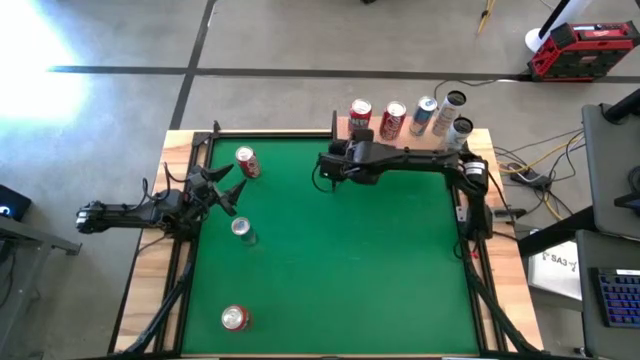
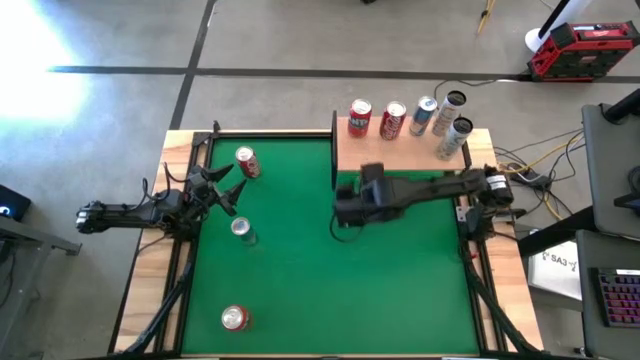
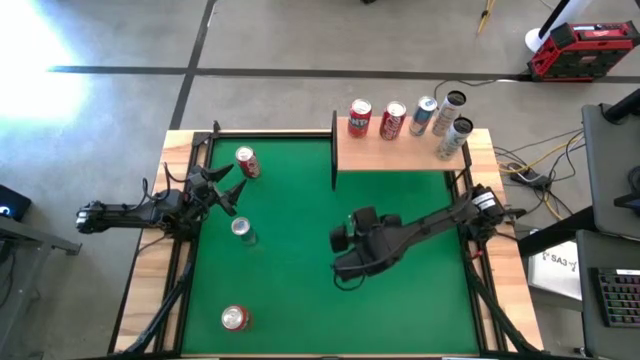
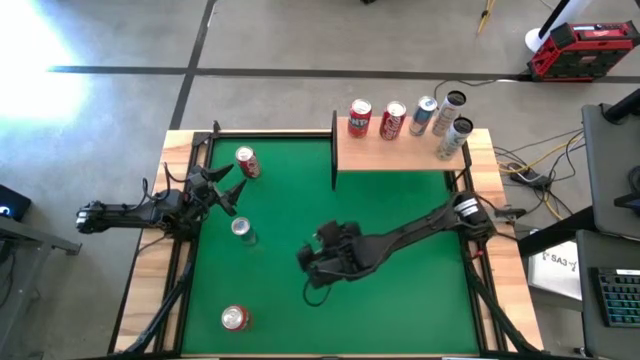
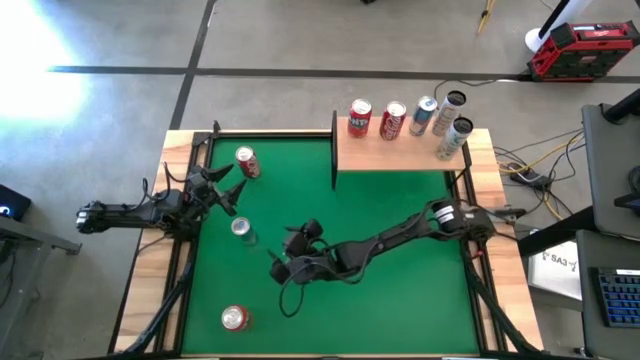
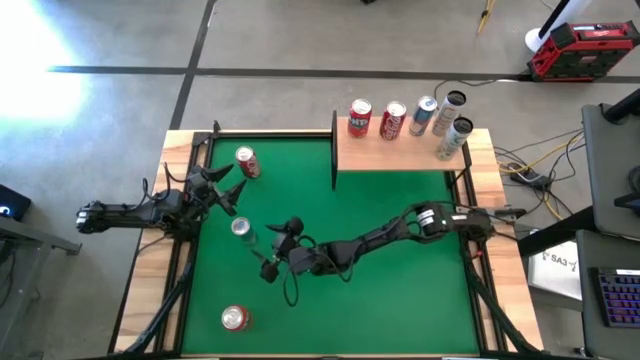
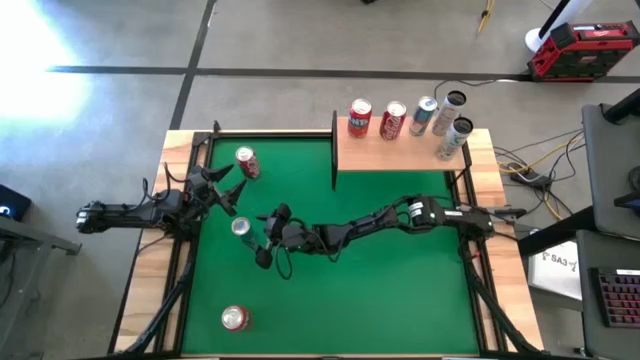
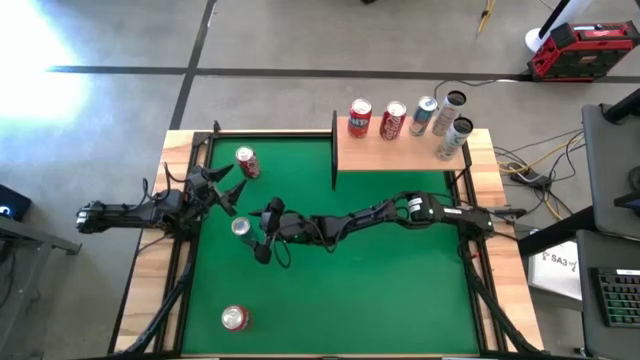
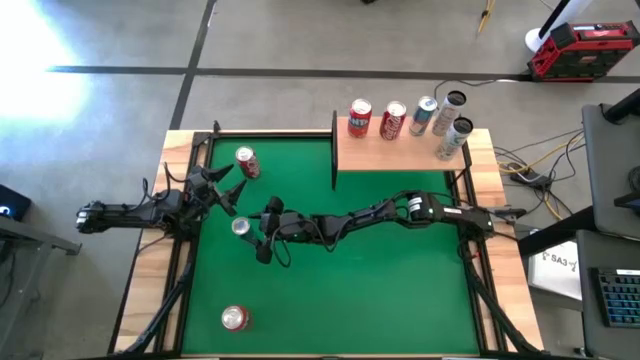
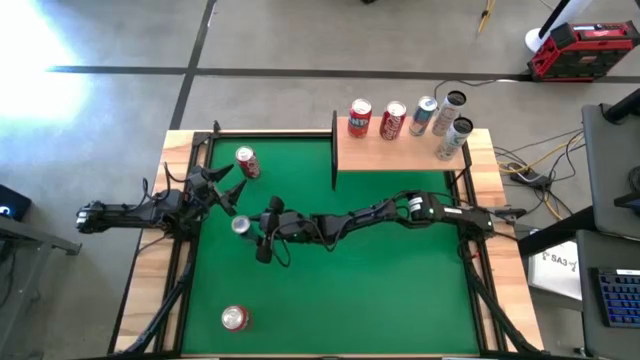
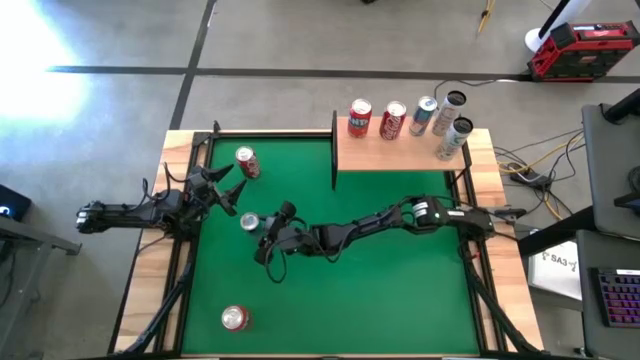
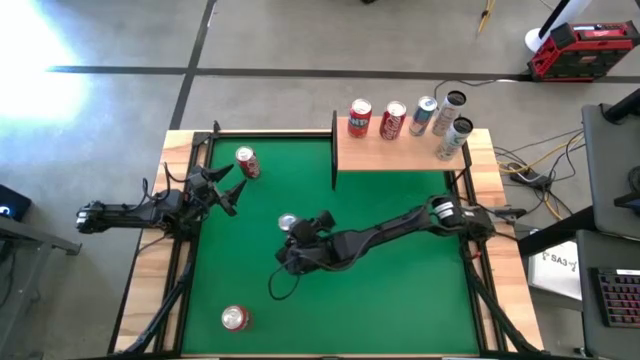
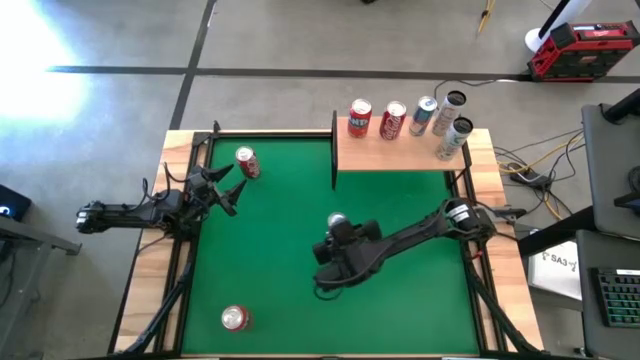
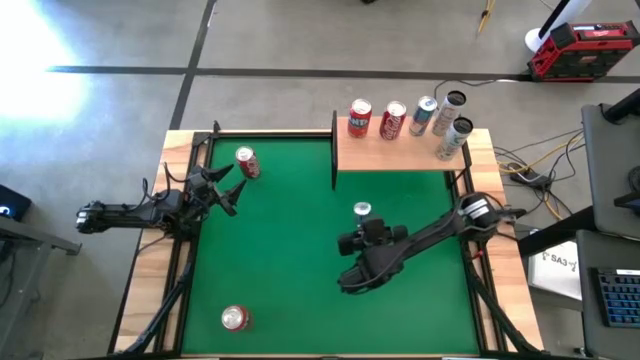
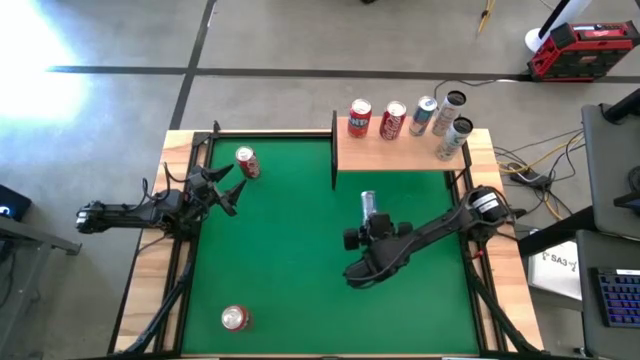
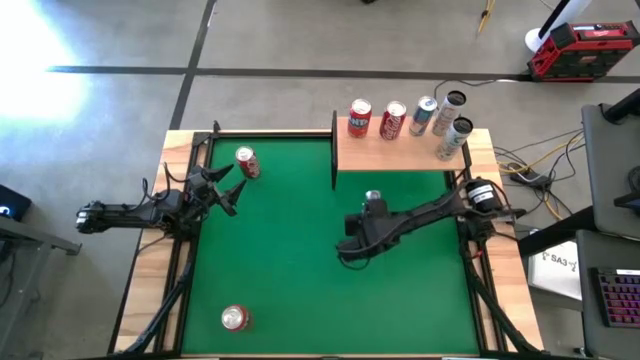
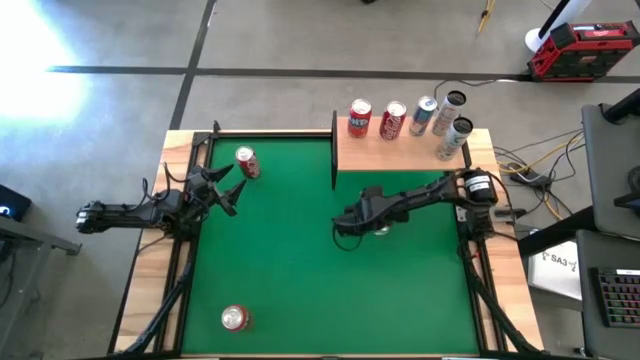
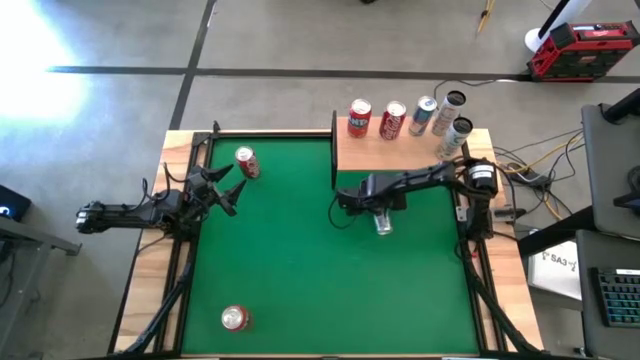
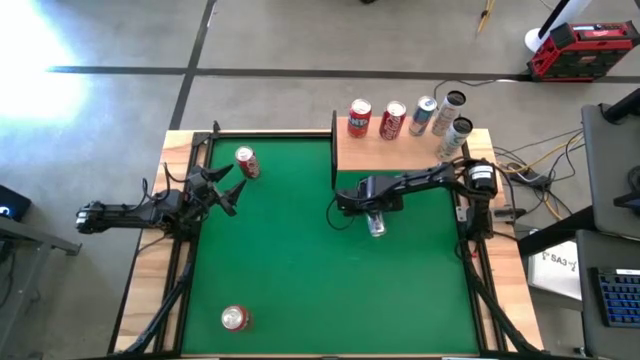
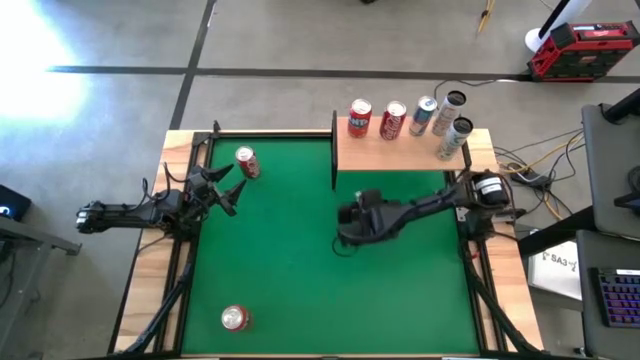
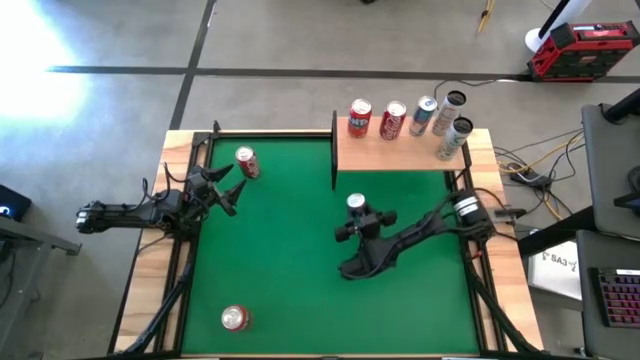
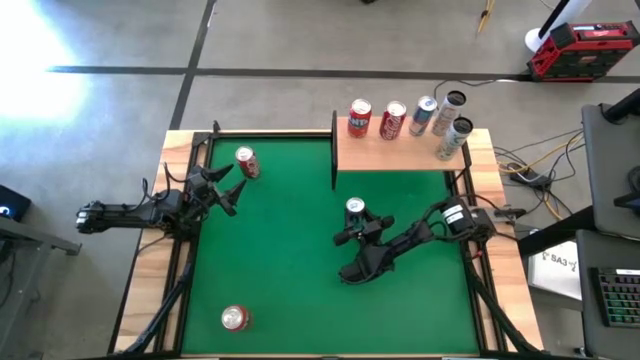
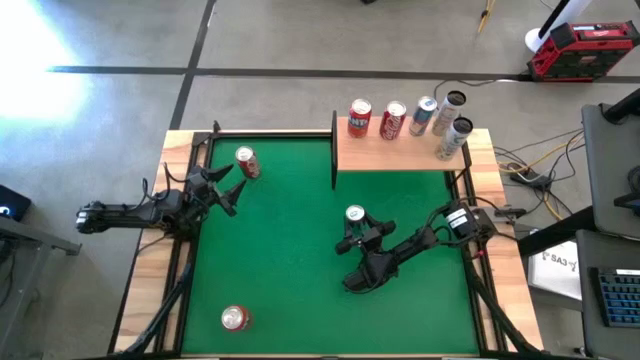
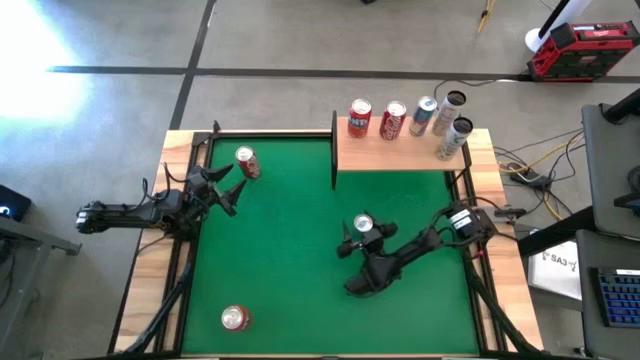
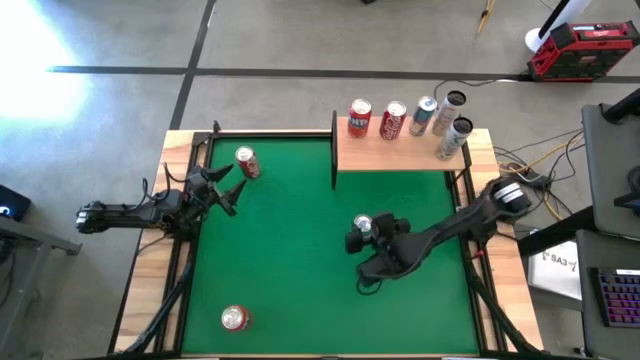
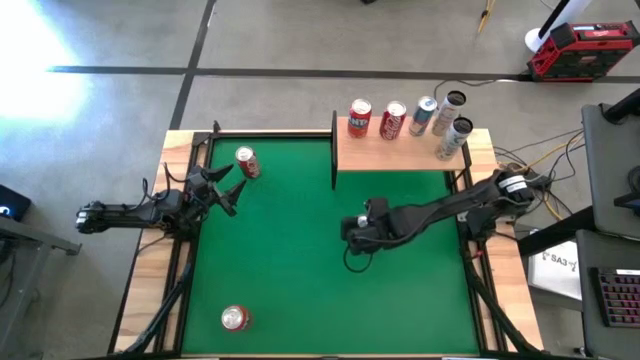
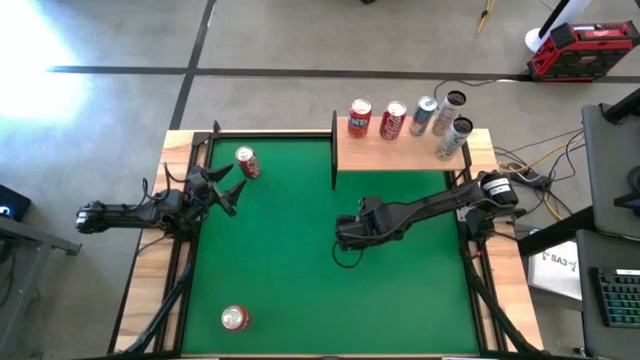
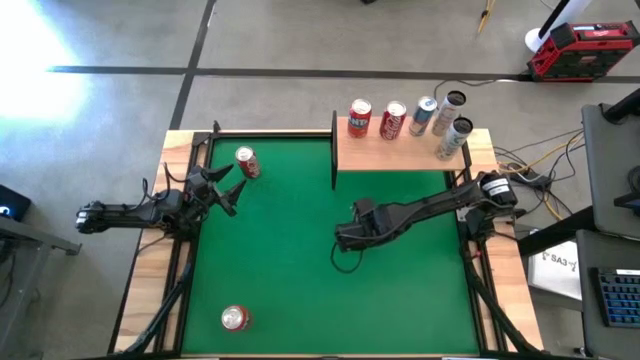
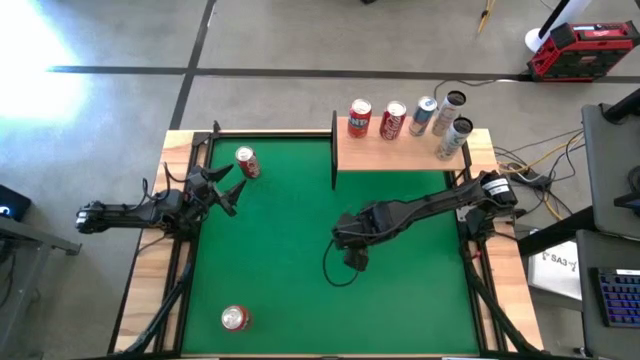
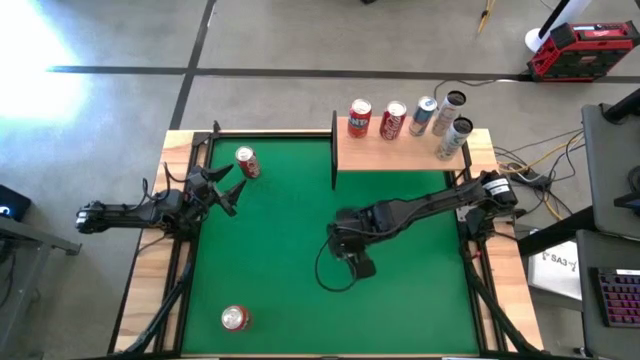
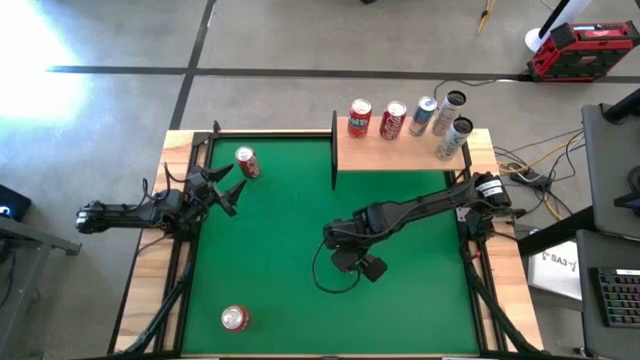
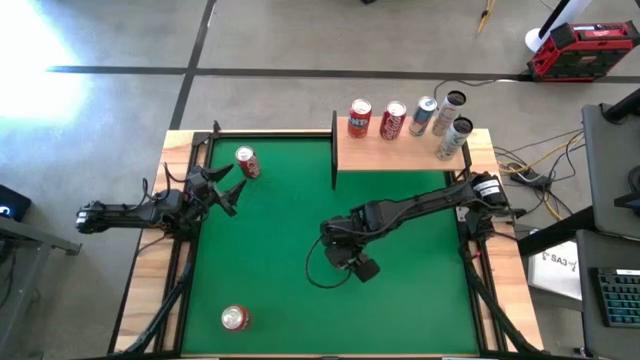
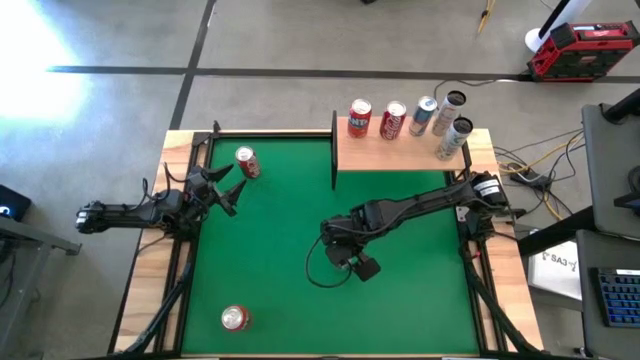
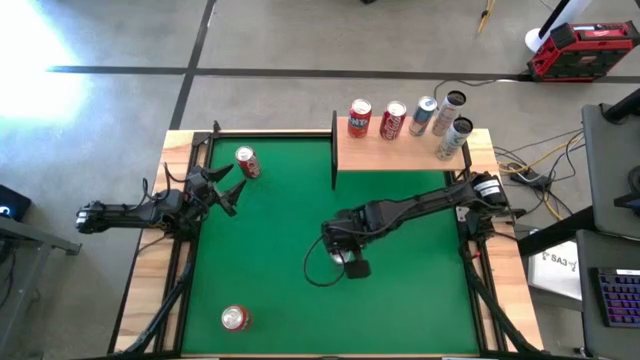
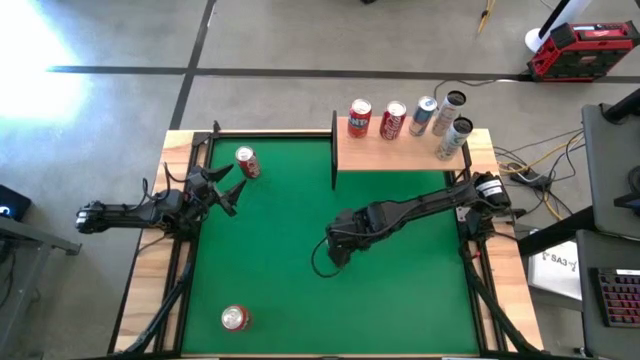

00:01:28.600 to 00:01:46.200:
Task: Place canned beverage on shelf
Put the blue soda can on the shelf aligned with the other blue soda can

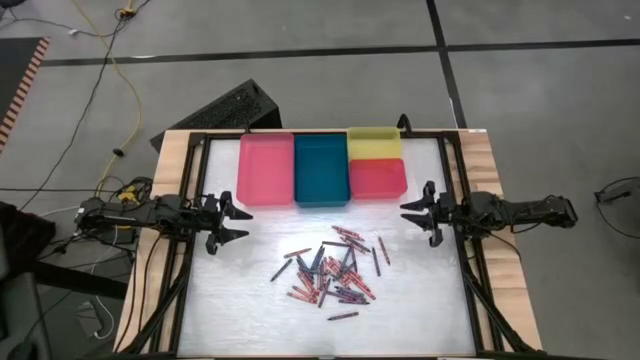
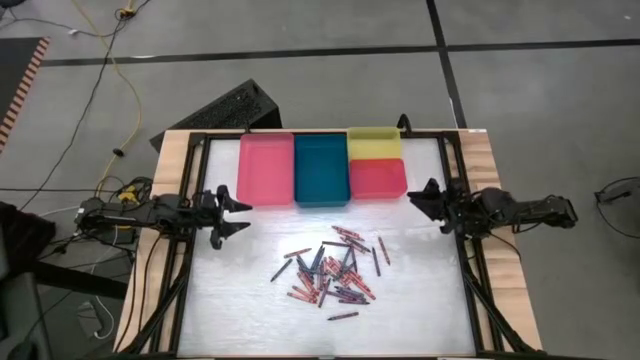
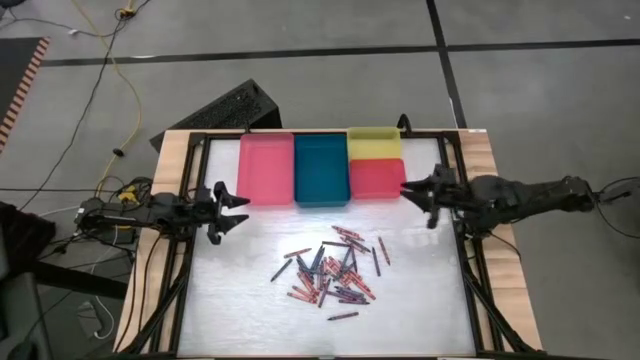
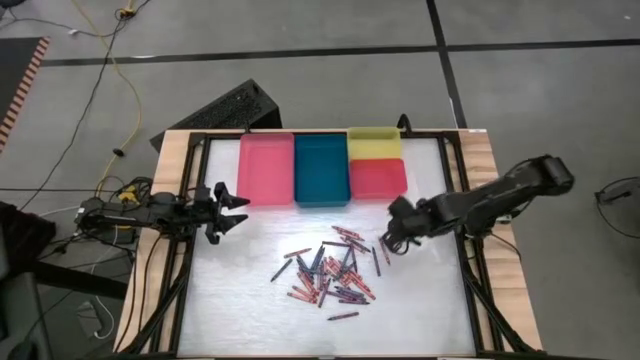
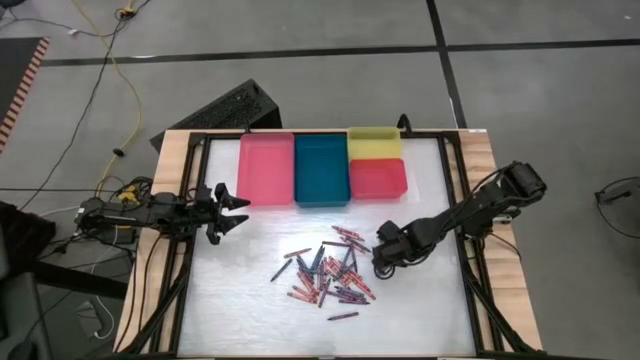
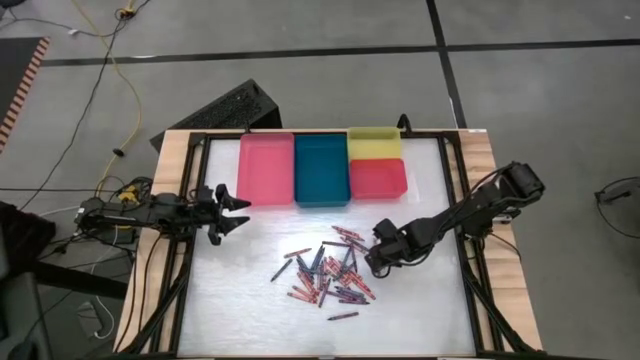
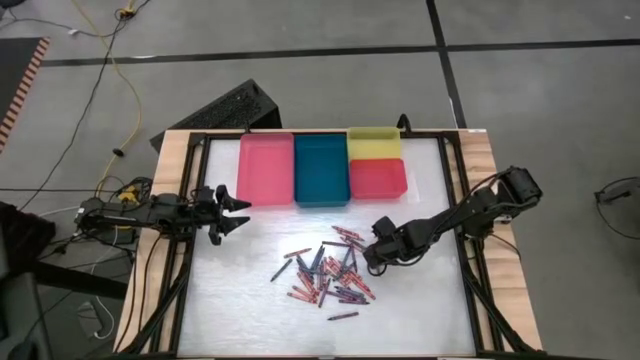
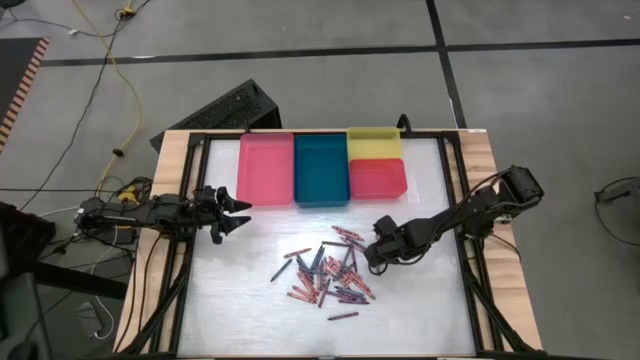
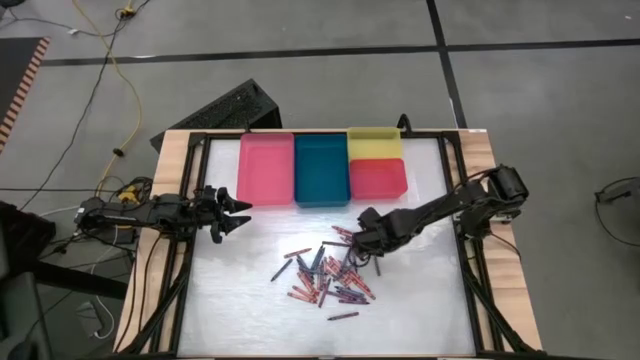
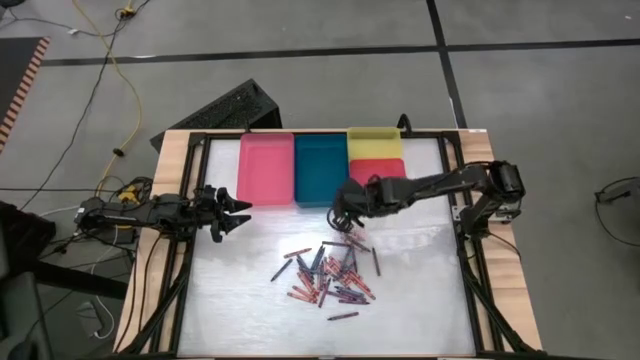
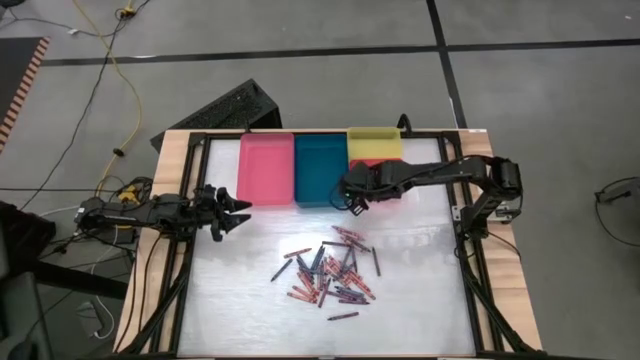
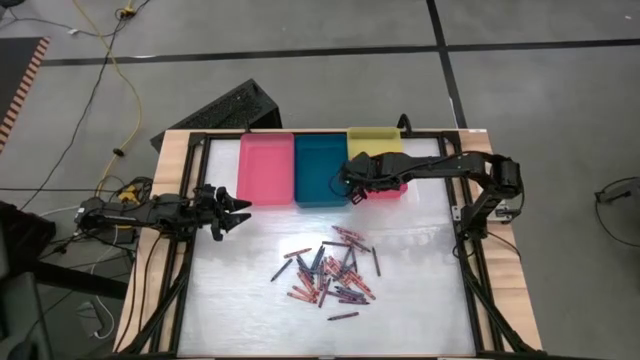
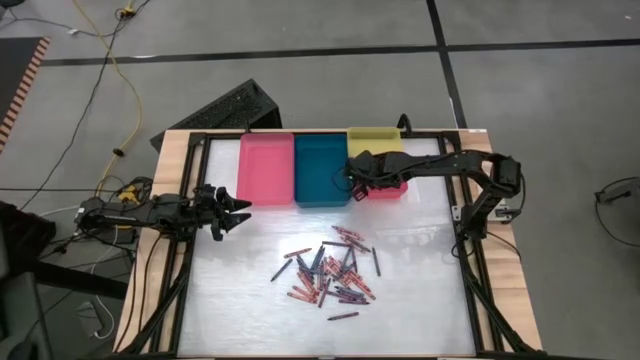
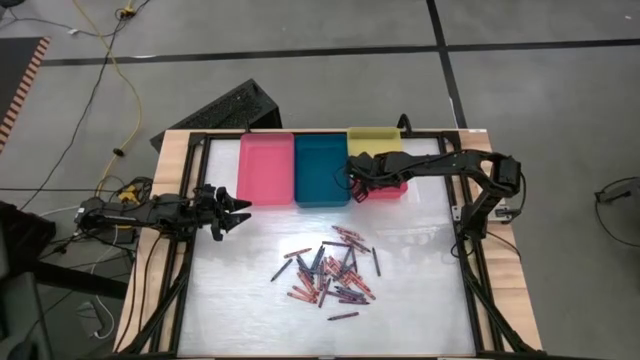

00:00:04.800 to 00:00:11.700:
Task: Sort crayons
Put the red crayon into the red bin
